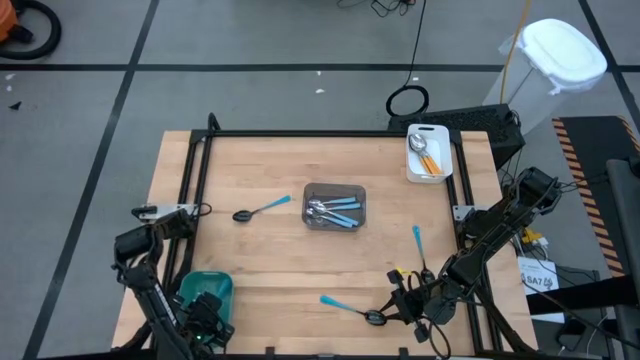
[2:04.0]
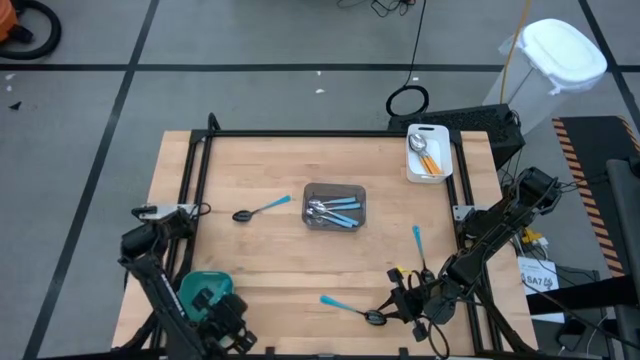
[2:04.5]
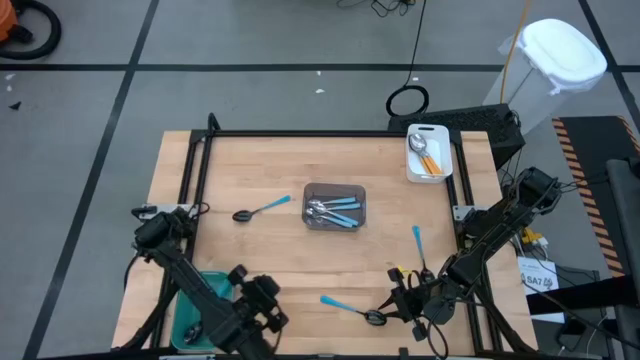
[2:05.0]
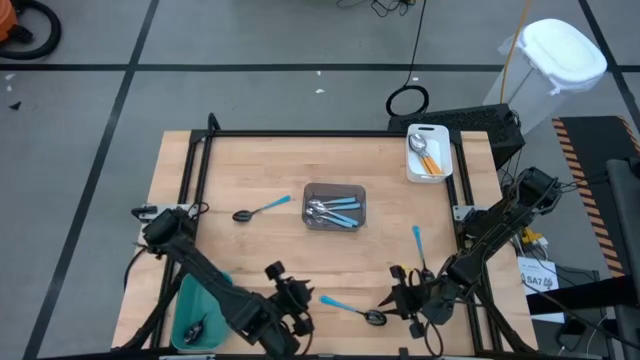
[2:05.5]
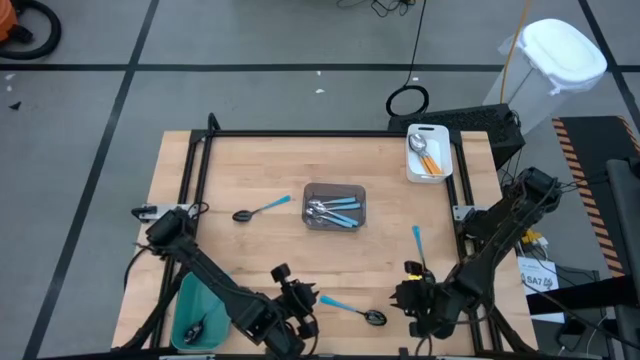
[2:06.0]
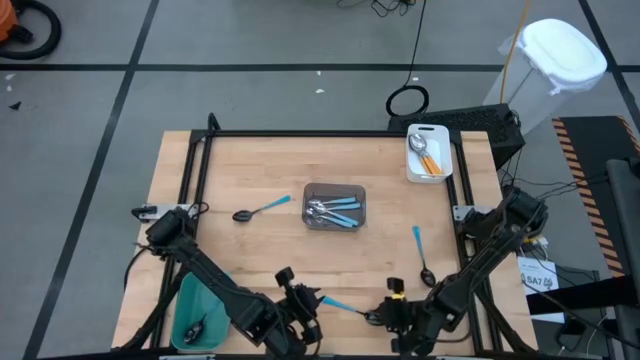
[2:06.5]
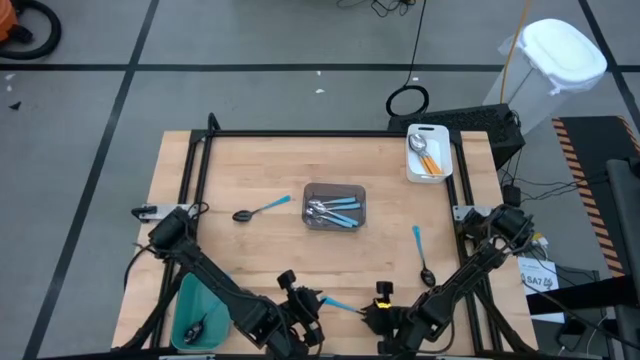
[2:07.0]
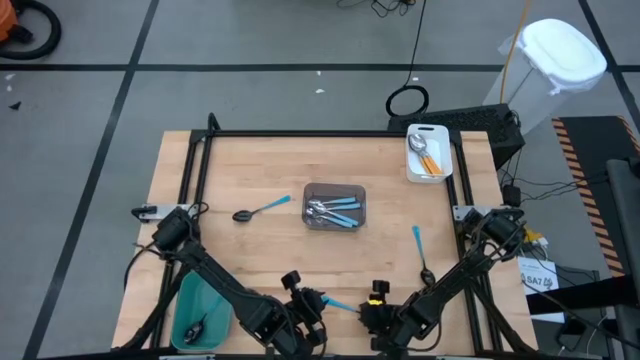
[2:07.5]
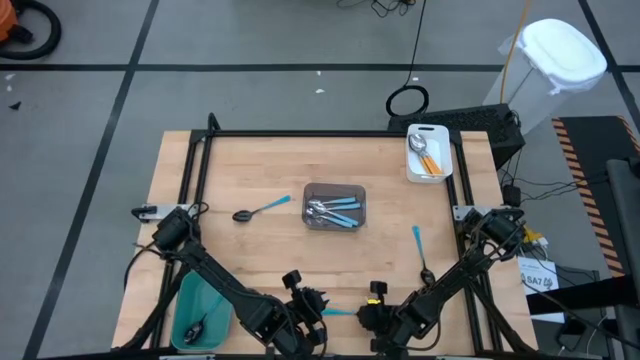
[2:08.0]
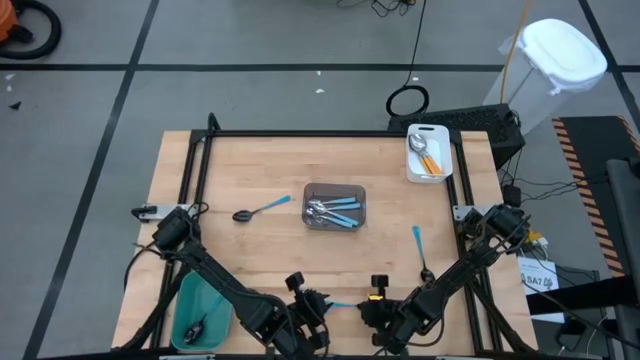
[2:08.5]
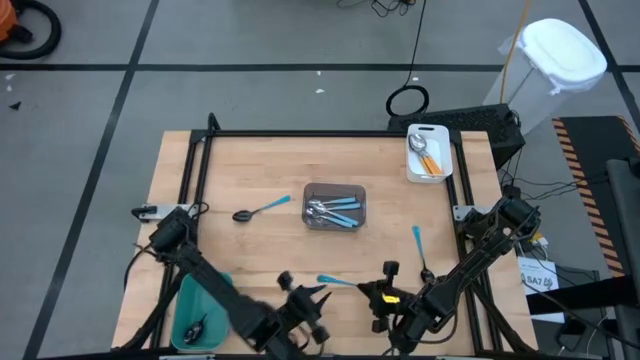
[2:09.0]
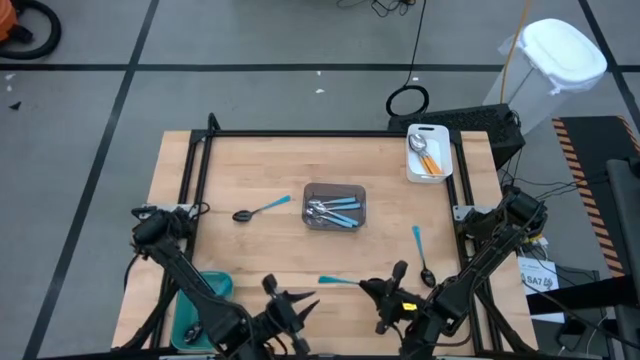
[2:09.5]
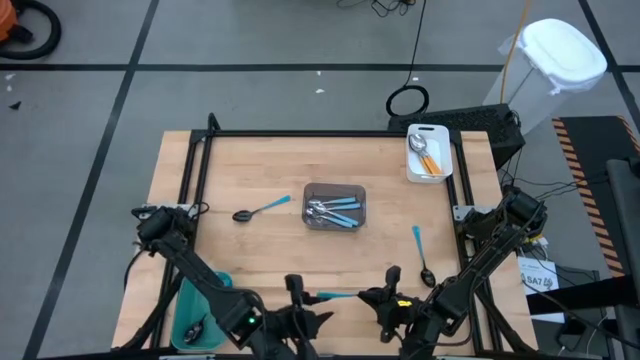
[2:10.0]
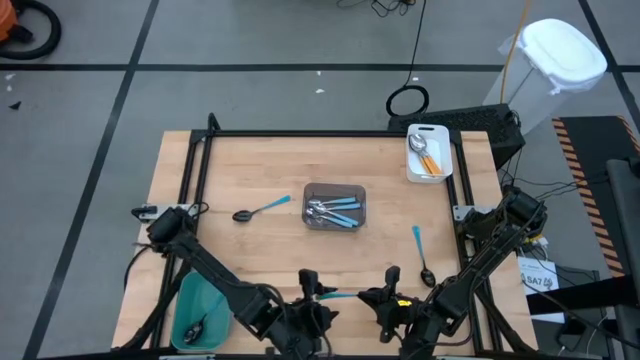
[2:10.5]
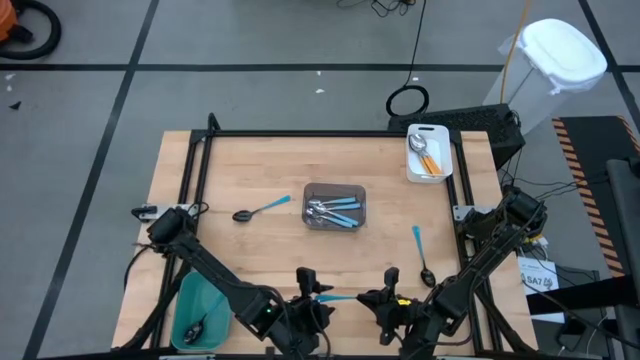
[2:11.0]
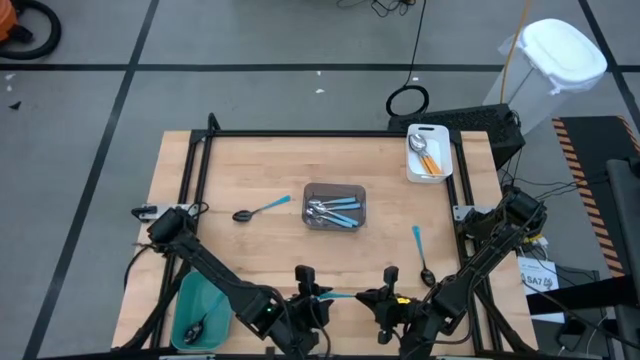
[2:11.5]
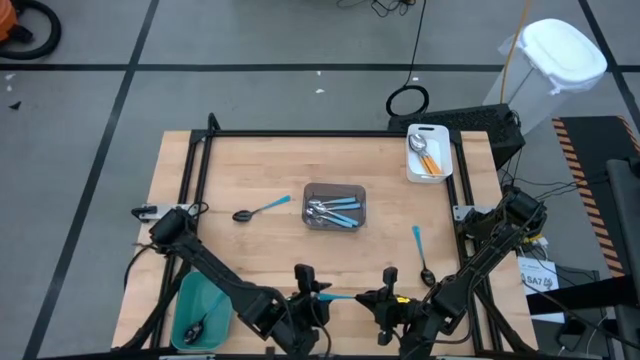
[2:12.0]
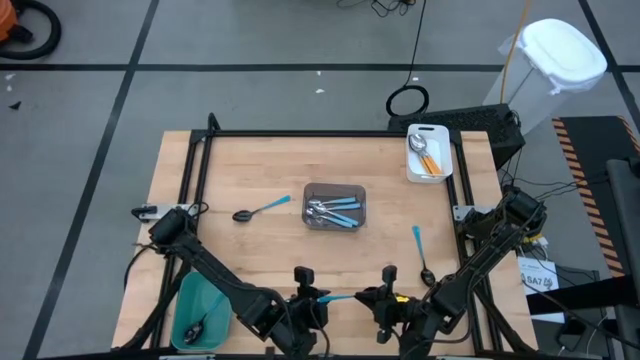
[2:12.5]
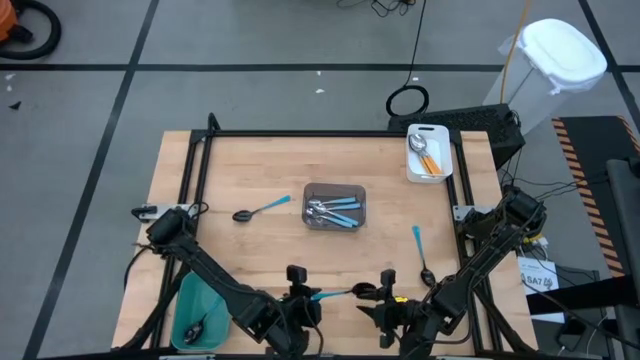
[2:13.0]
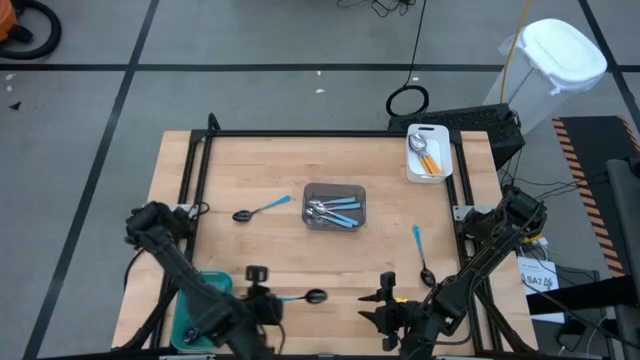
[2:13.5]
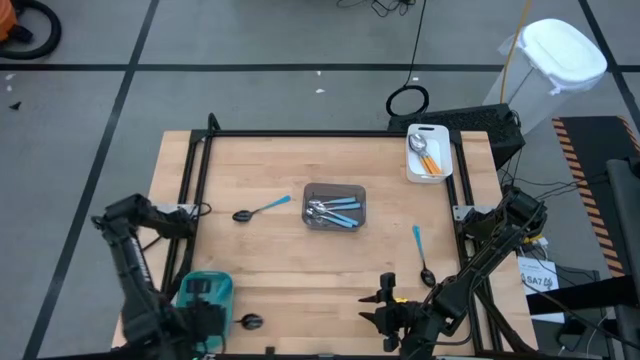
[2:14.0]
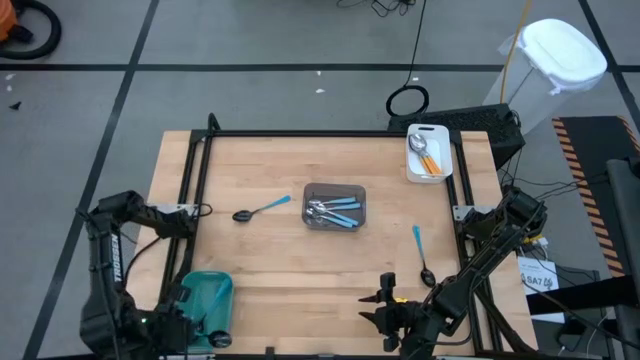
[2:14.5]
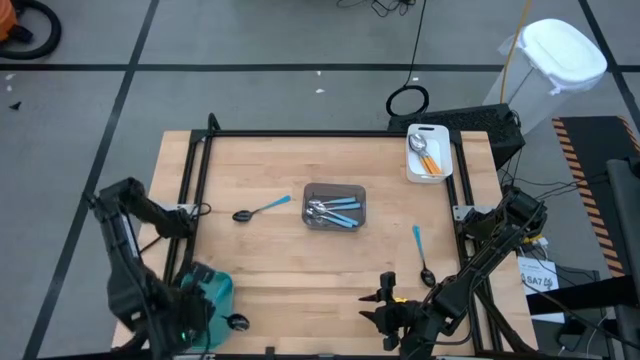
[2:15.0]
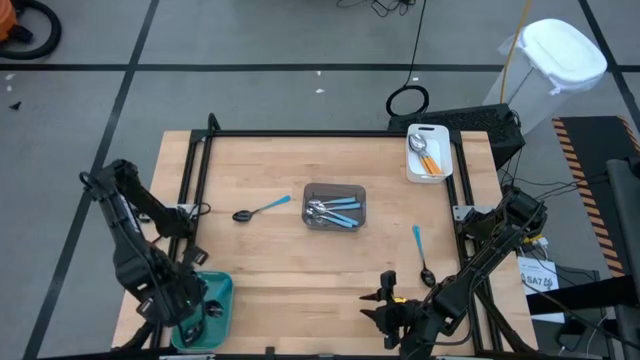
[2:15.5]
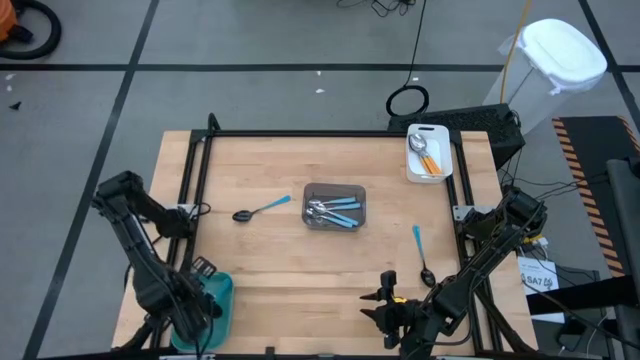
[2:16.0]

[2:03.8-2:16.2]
Task: Sort silverware by color (type)
Put the center dark blue spoon into the blue bin

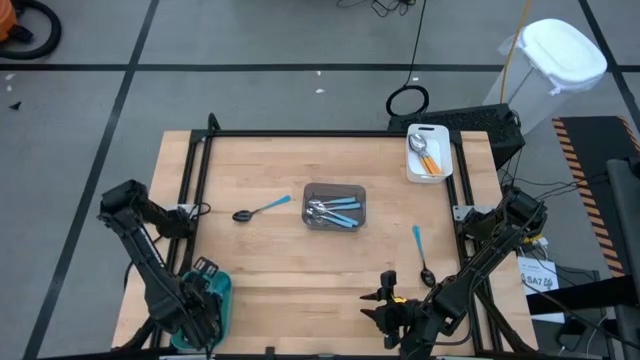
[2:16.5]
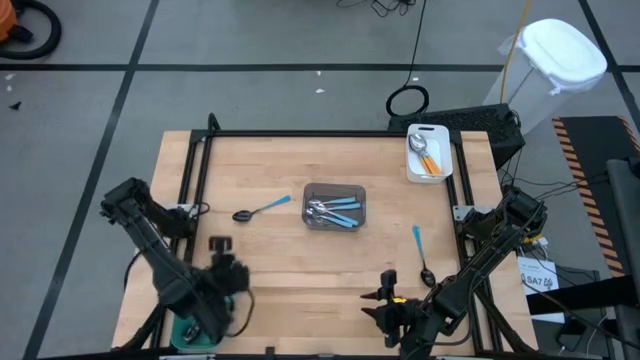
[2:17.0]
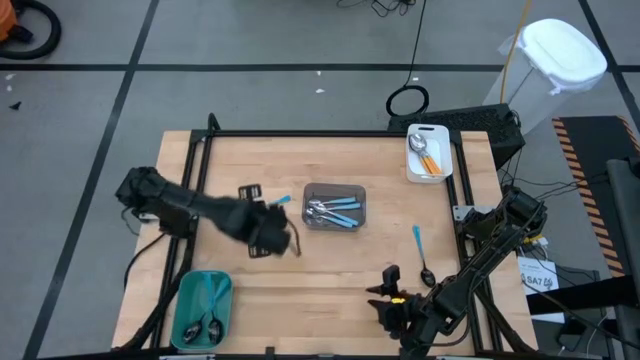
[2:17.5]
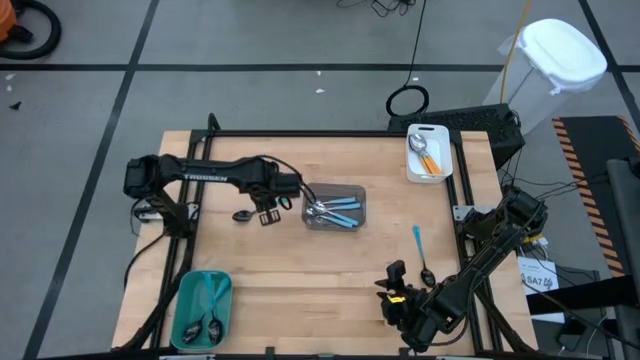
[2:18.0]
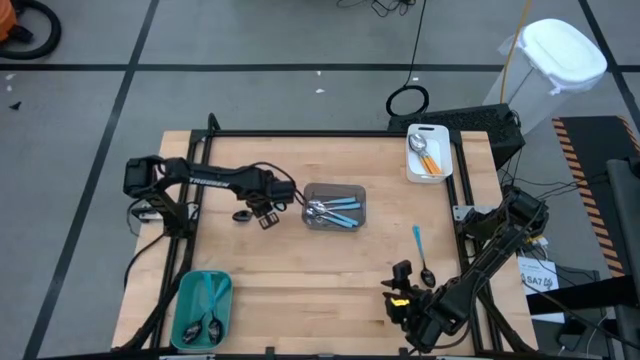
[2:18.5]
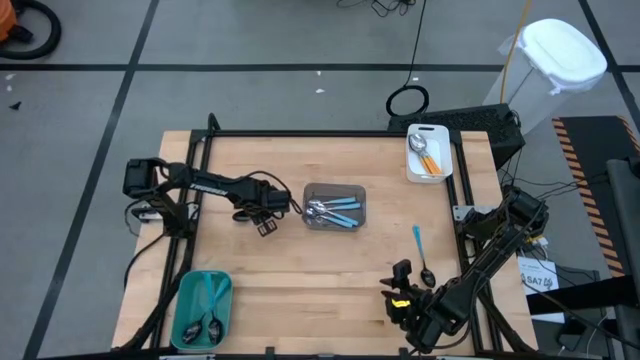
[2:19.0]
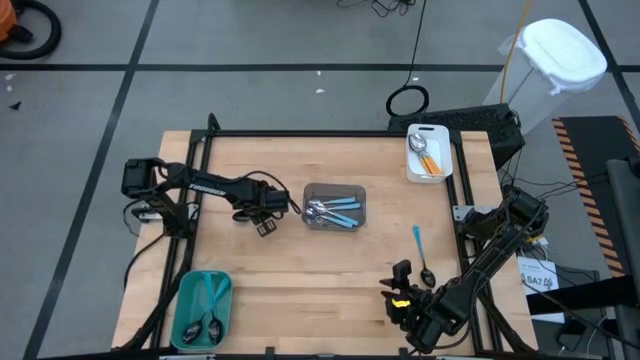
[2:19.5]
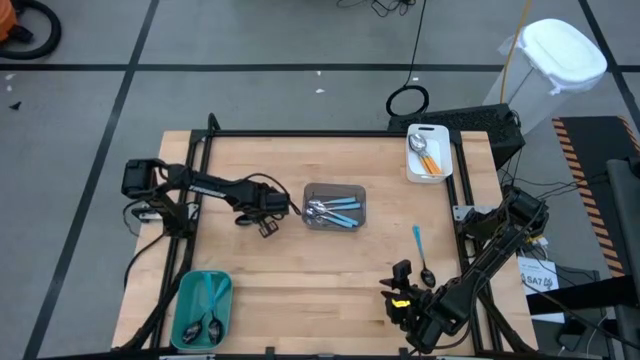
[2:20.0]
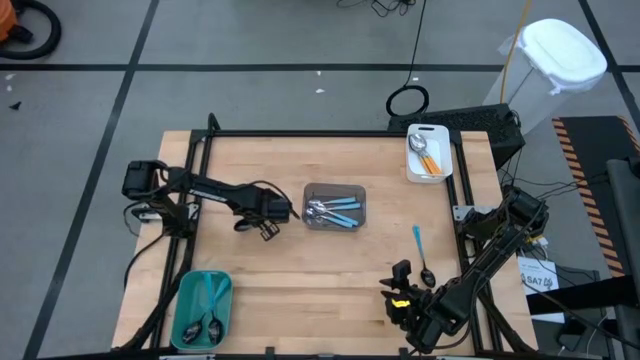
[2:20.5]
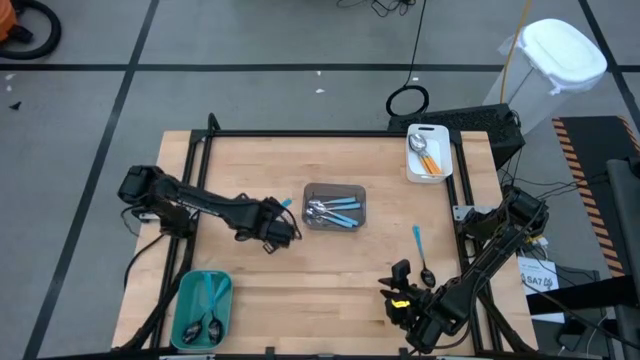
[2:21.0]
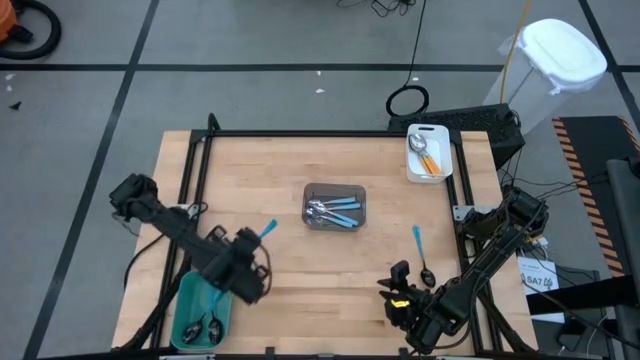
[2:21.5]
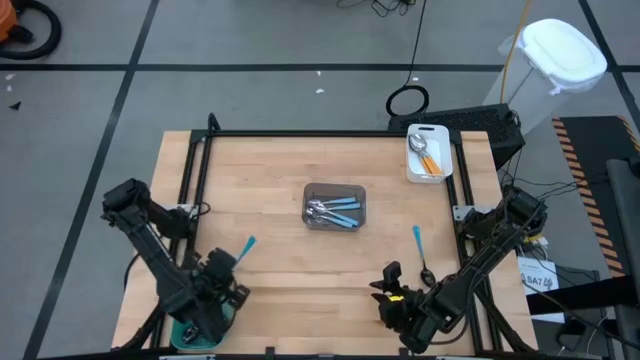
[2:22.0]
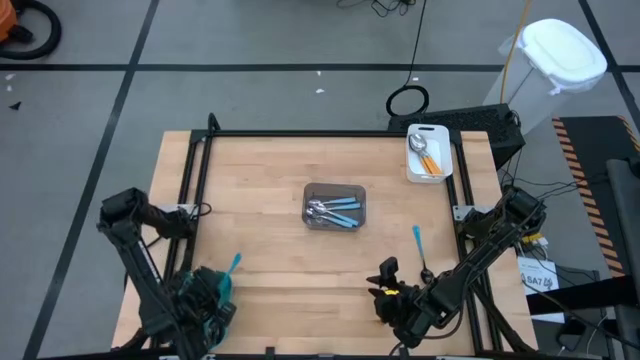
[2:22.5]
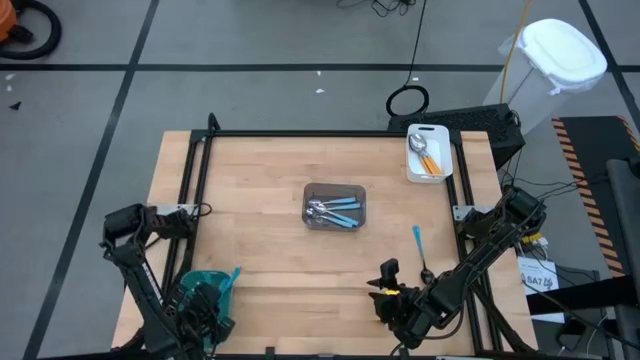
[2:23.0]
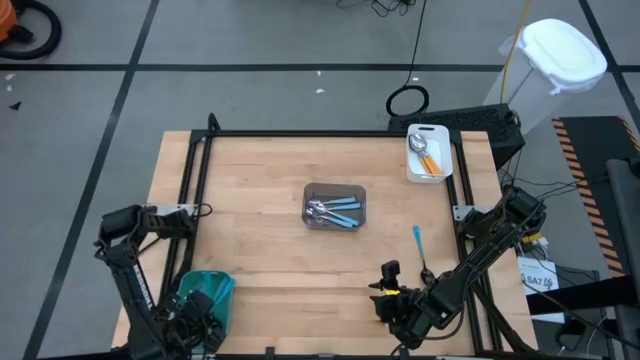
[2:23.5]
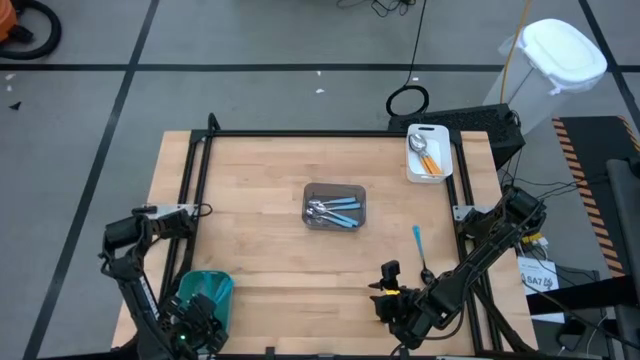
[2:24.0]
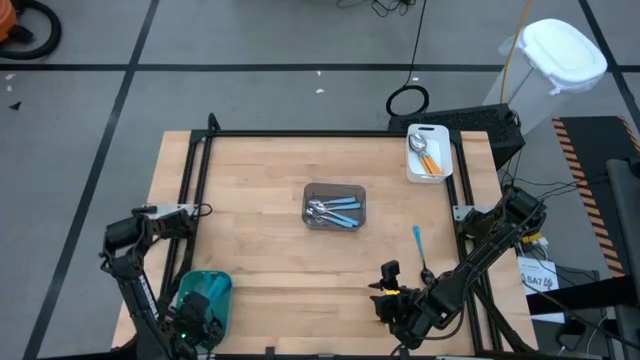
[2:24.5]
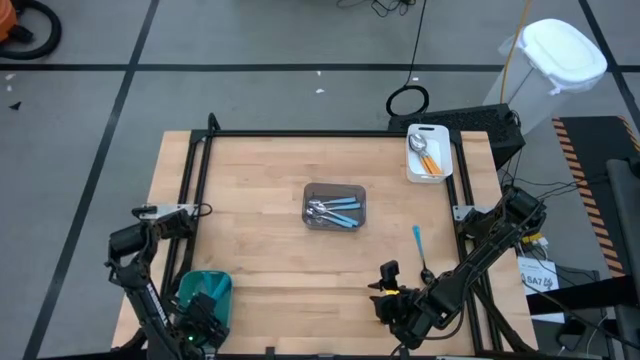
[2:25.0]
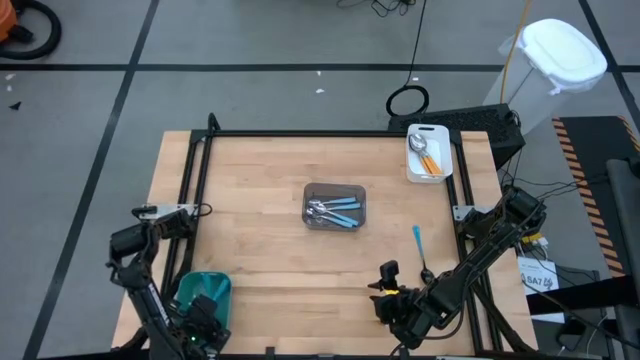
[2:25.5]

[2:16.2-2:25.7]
Put the left dark blue spoon into the blue bin
